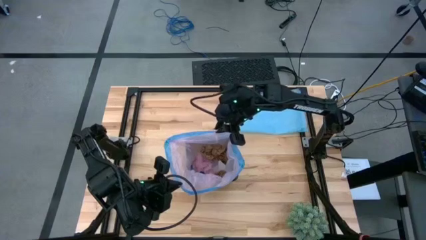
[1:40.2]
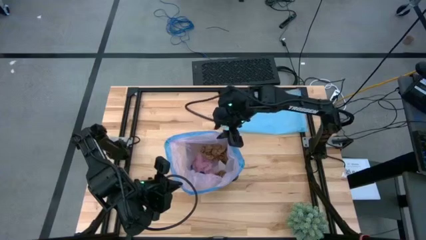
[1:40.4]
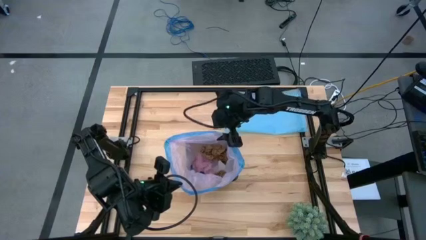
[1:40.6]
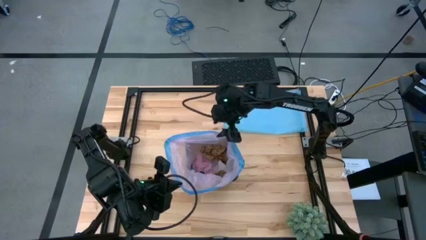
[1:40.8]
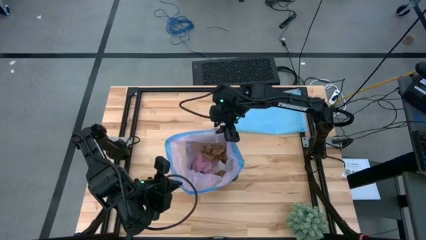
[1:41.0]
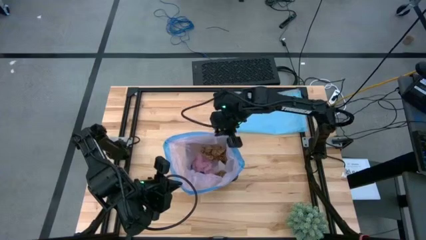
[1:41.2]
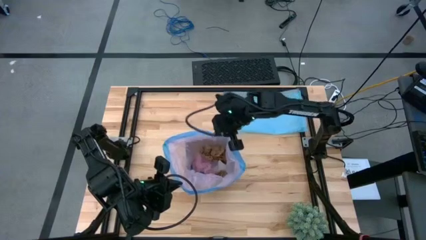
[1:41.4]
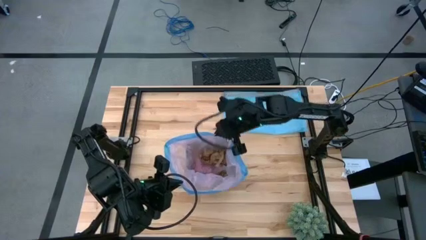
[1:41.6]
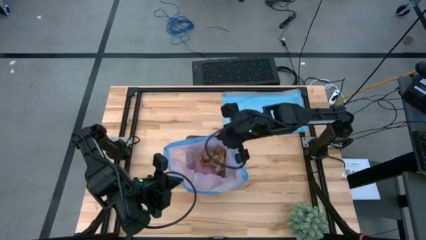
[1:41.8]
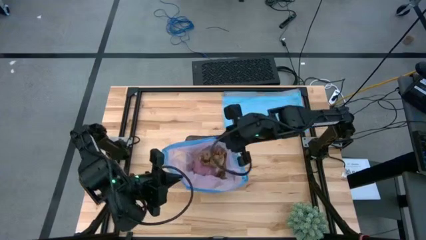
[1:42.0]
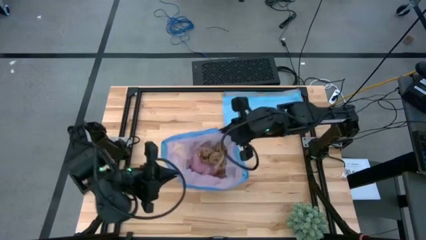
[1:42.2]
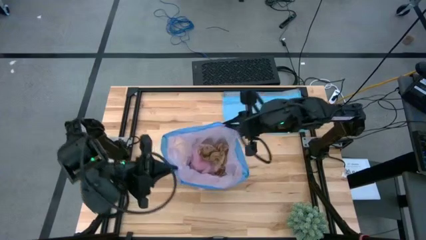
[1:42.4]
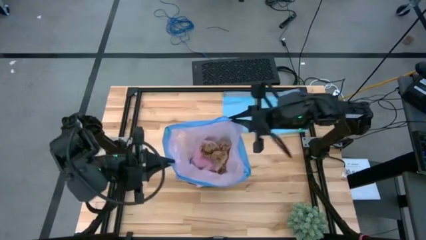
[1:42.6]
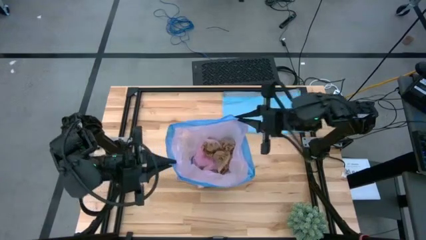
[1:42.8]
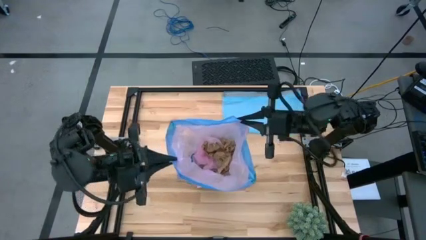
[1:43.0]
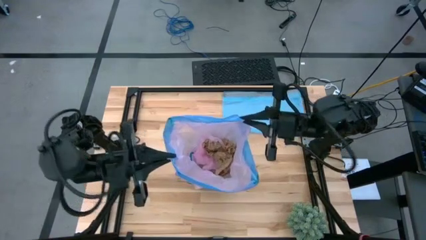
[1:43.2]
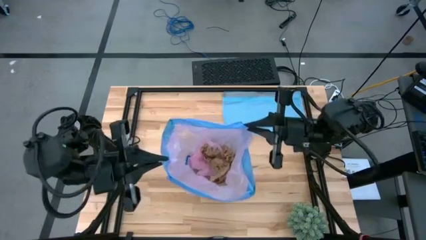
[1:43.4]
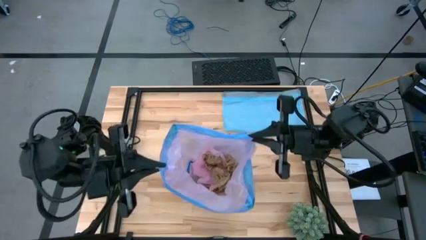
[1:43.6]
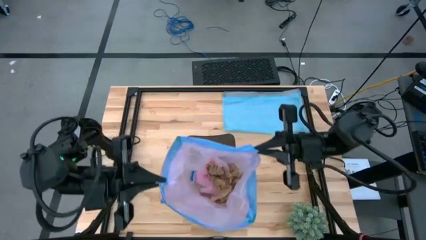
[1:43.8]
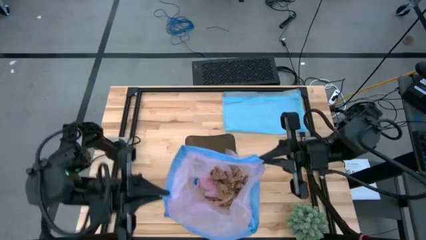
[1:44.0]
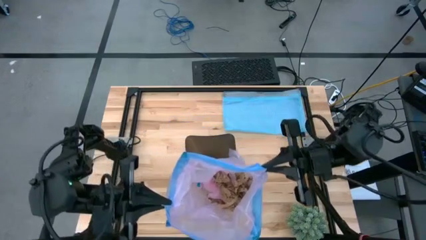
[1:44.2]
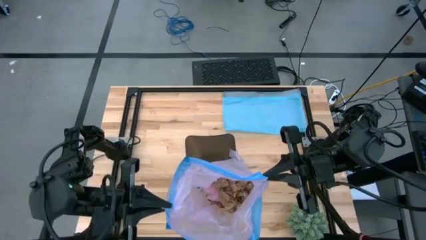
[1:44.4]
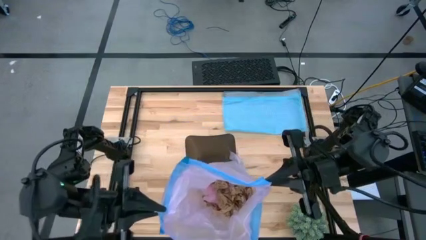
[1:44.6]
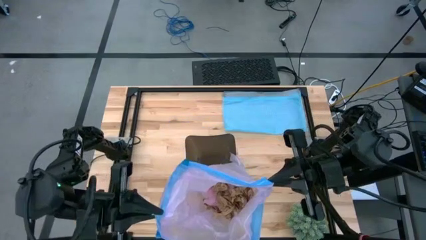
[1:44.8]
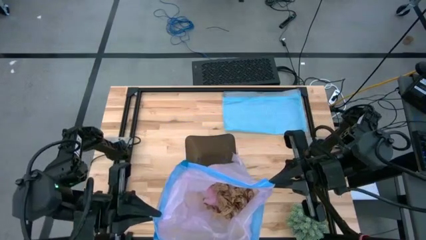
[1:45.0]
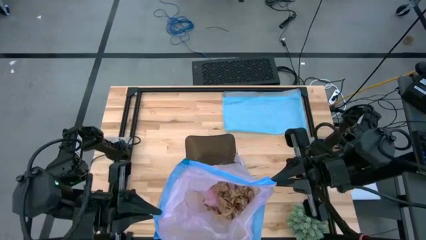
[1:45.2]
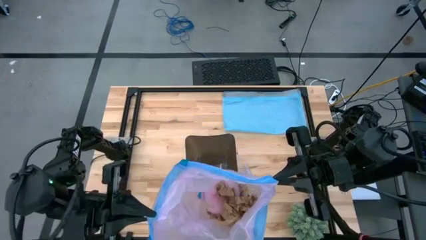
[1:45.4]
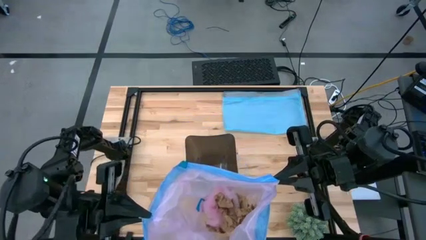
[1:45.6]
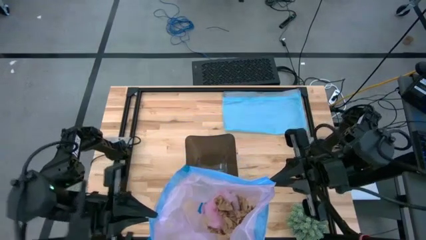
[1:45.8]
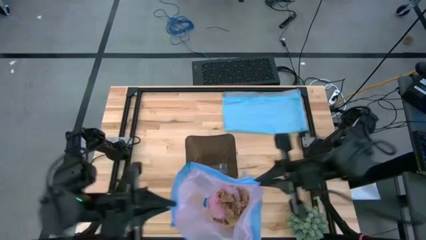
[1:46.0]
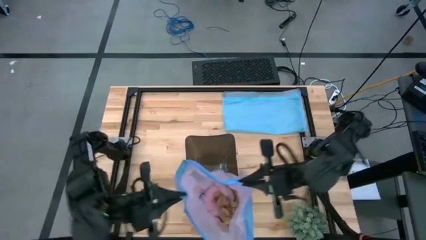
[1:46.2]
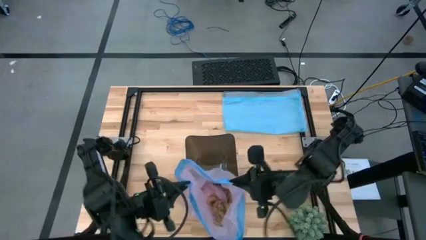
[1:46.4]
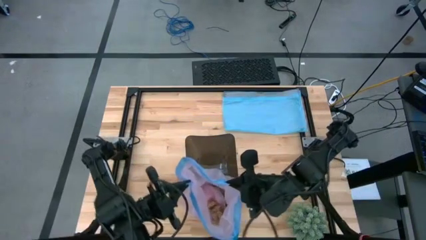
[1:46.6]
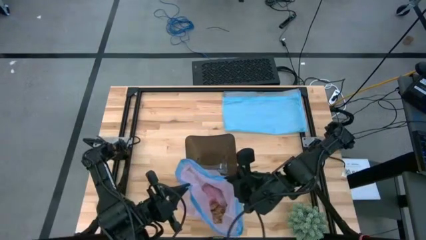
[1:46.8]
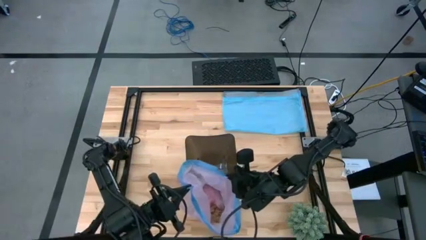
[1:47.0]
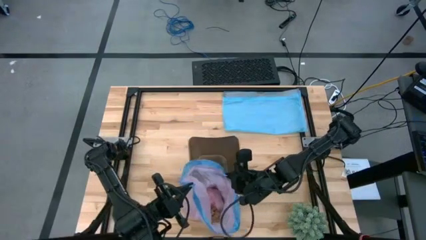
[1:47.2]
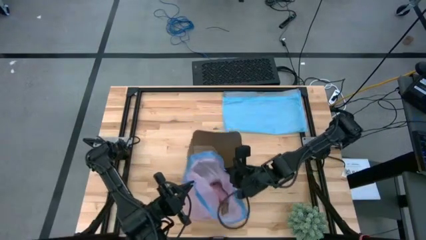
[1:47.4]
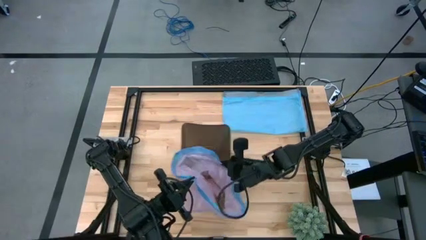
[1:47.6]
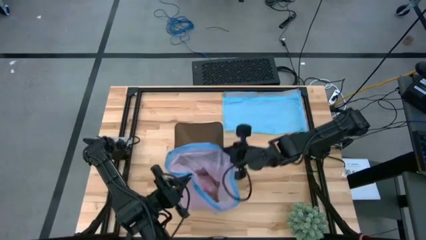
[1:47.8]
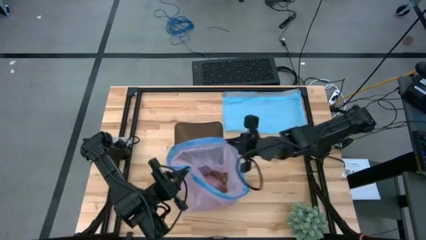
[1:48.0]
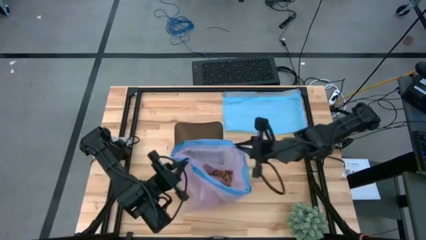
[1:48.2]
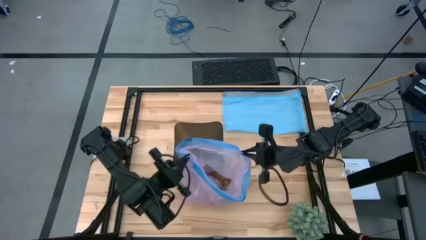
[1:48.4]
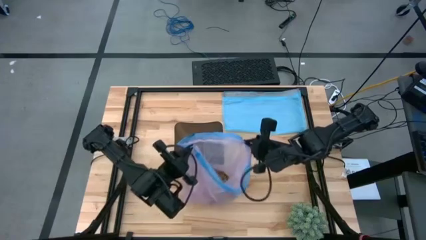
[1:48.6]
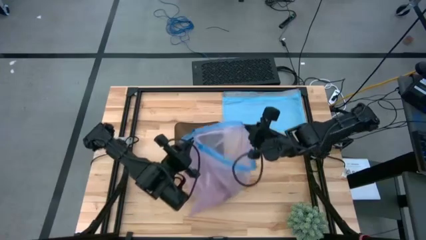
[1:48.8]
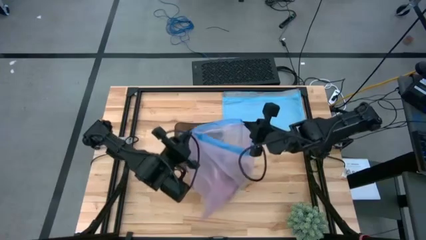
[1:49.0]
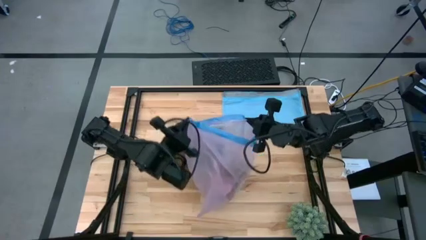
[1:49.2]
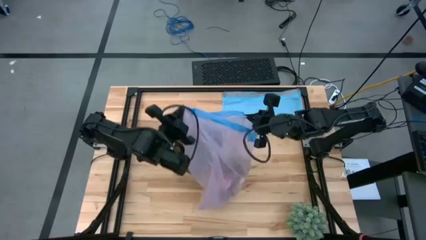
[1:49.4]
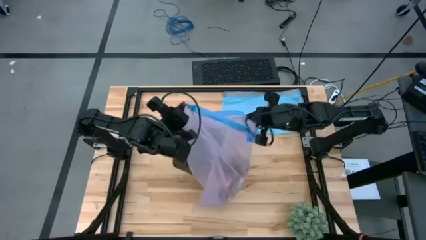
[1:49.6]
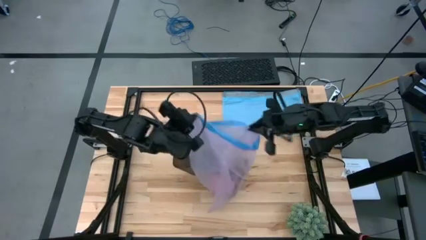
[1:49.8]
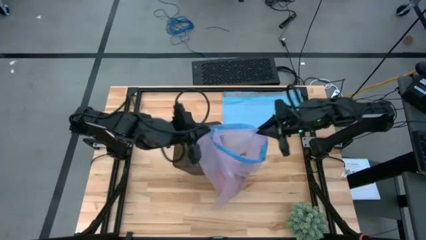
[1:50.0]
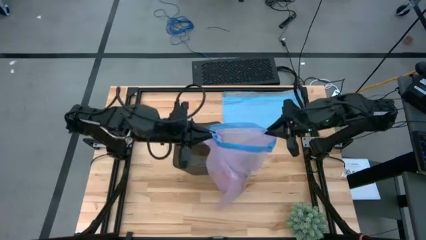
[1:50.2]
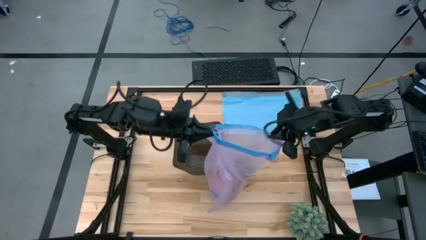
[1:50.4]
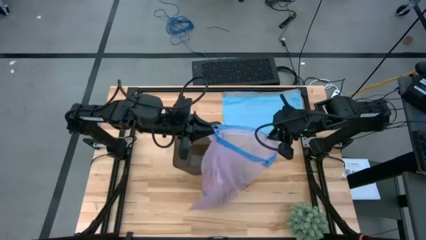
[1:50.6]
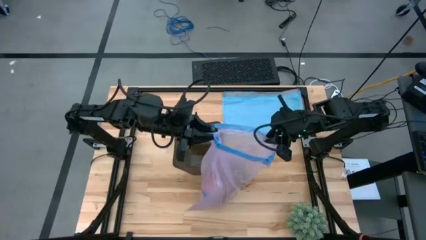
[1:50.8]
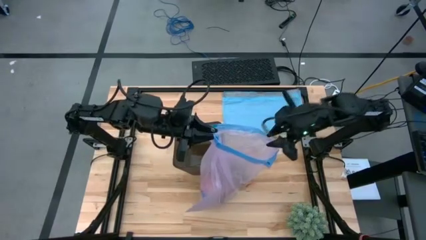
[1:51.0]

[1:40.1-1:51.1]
Task: place trash/remove bag and relplace
Remove the trash bag from the trash bin
